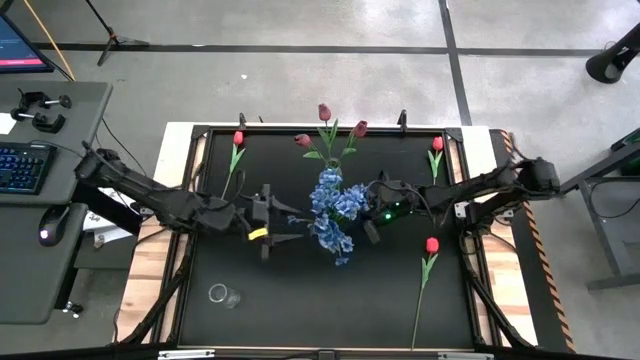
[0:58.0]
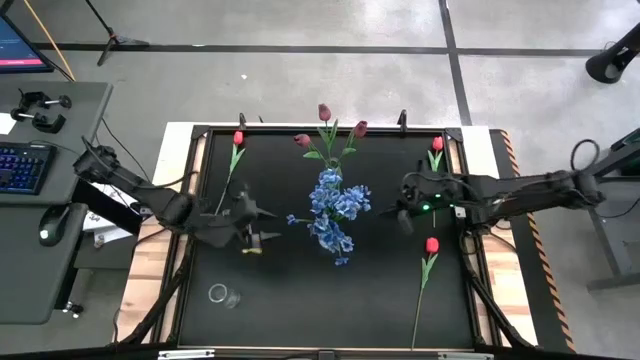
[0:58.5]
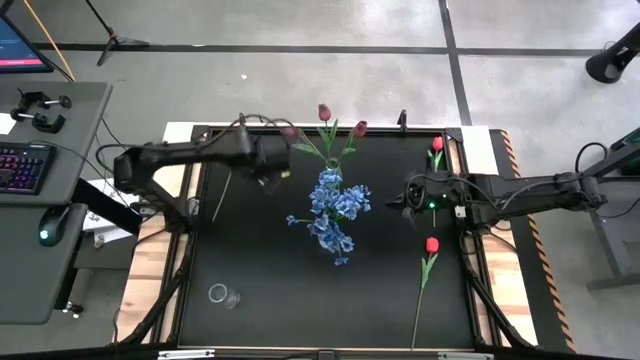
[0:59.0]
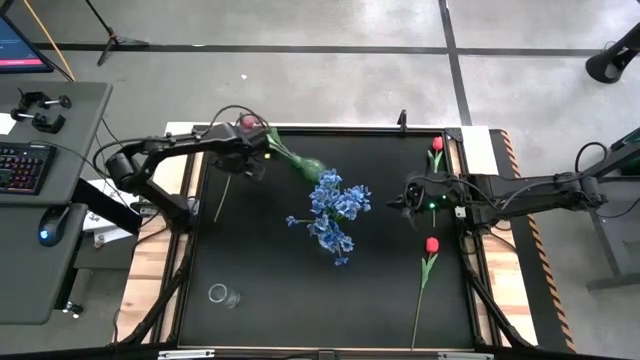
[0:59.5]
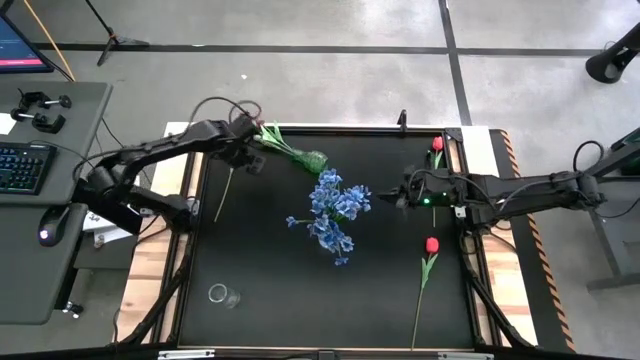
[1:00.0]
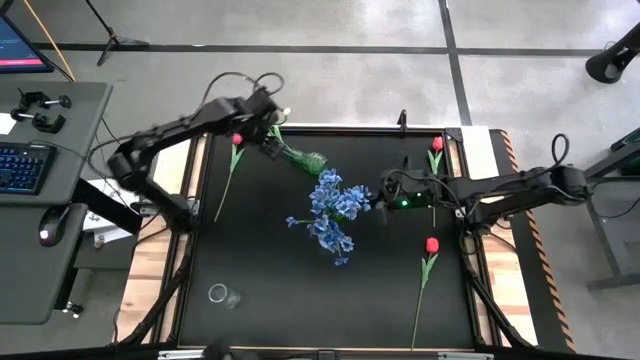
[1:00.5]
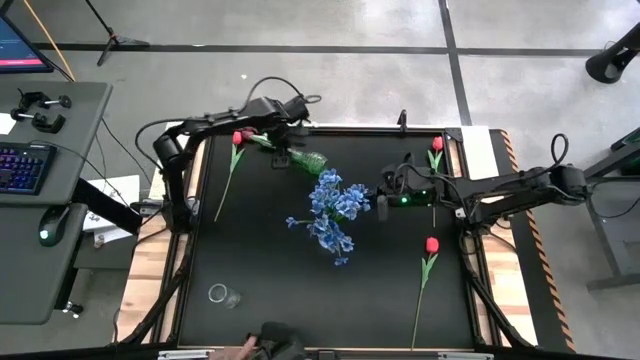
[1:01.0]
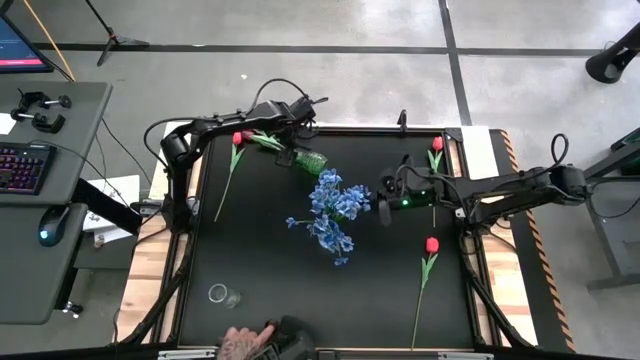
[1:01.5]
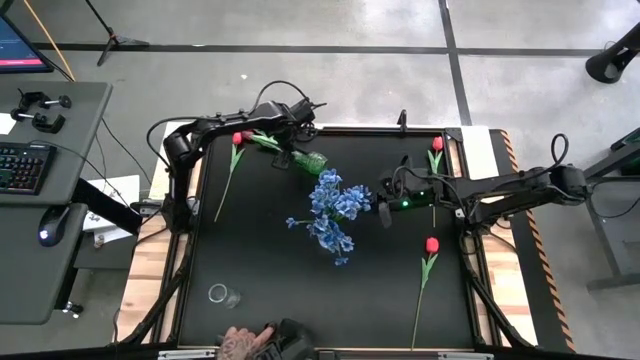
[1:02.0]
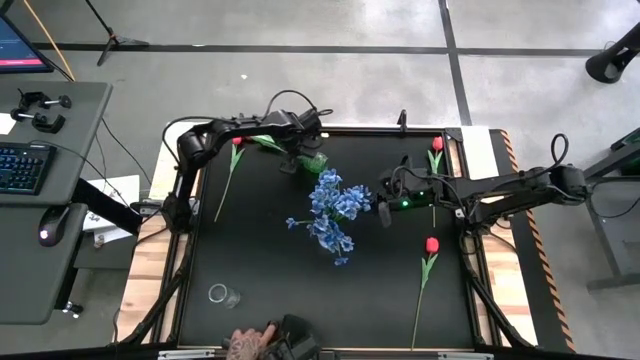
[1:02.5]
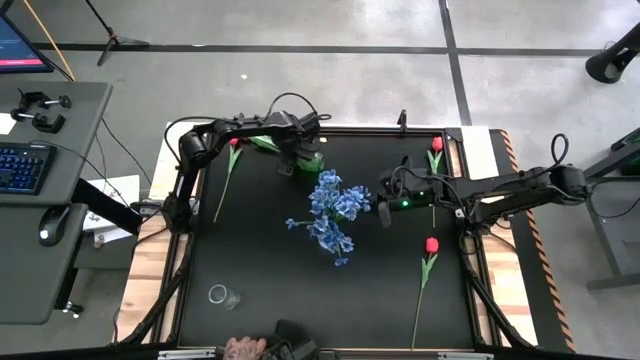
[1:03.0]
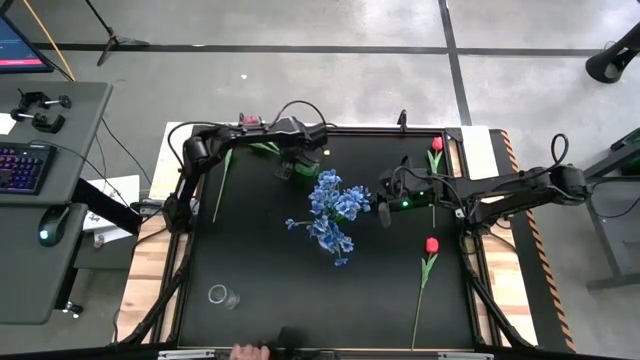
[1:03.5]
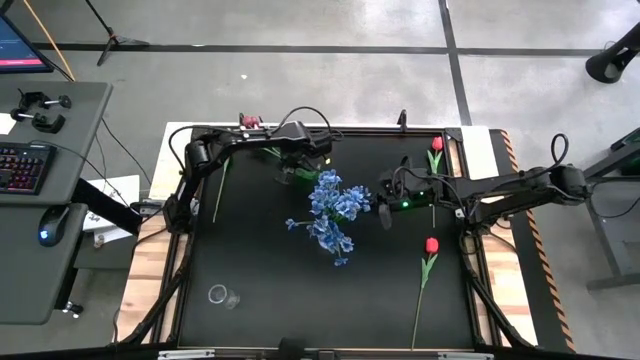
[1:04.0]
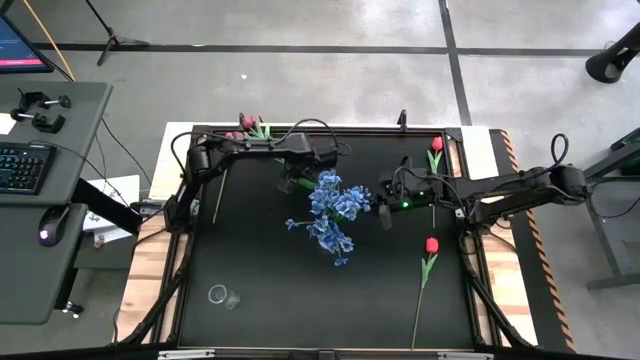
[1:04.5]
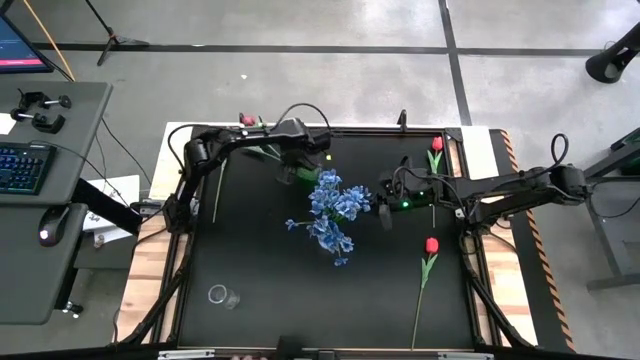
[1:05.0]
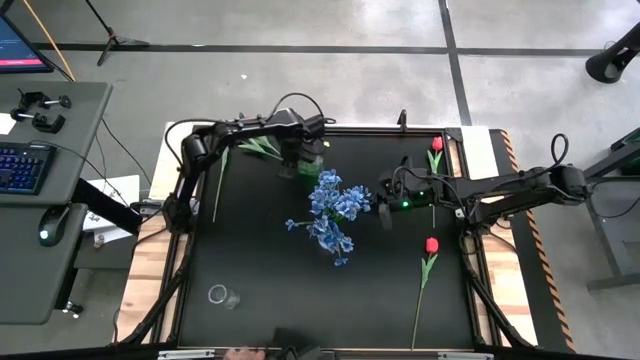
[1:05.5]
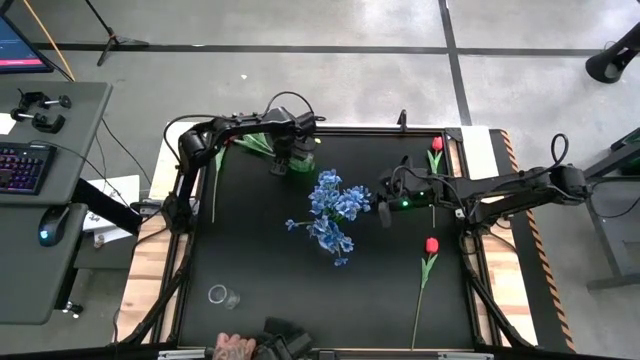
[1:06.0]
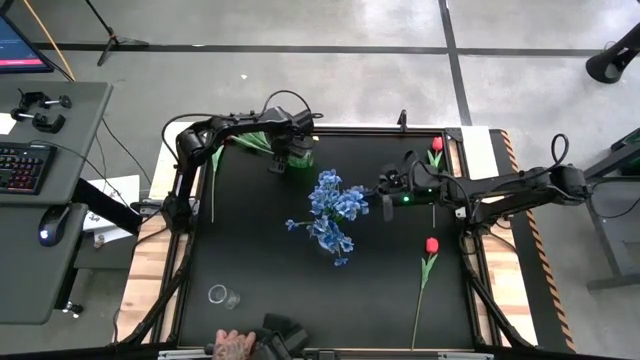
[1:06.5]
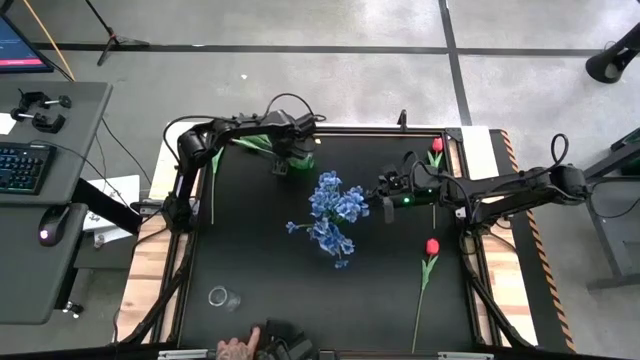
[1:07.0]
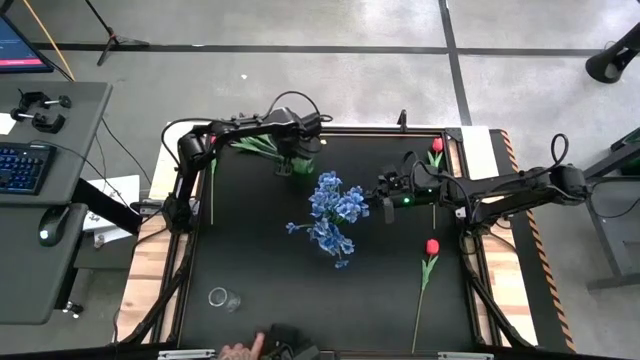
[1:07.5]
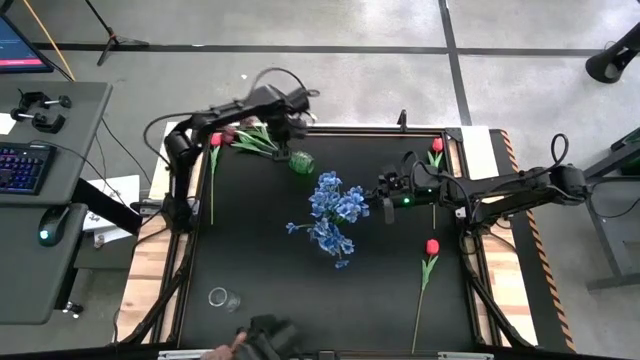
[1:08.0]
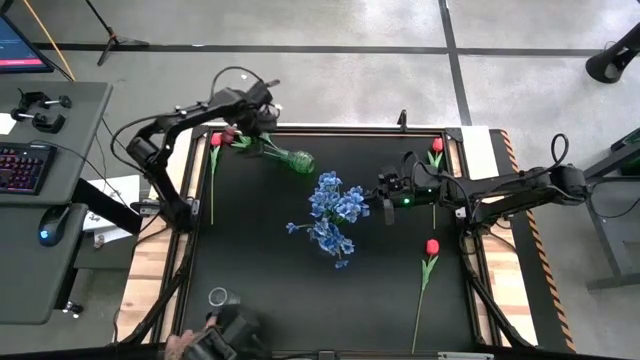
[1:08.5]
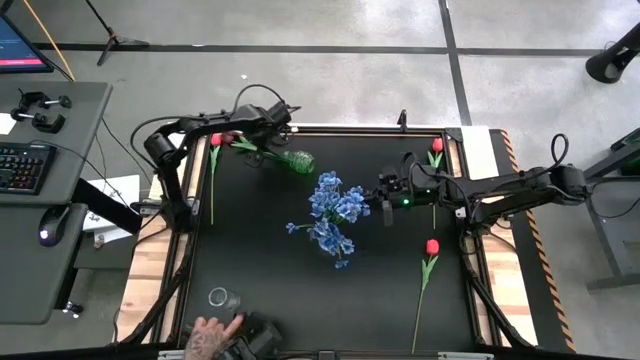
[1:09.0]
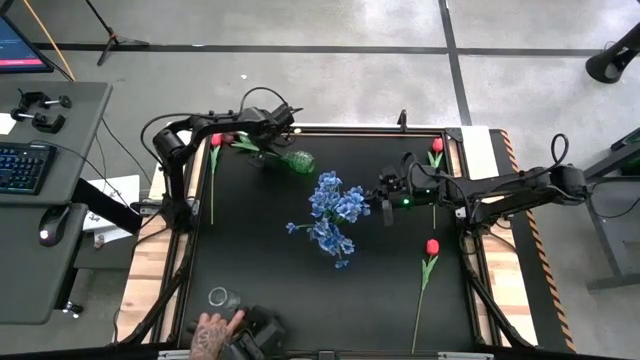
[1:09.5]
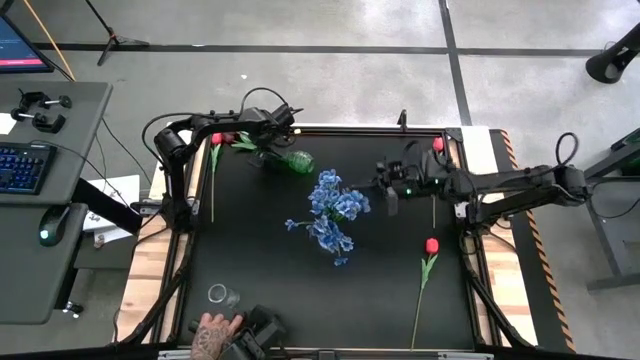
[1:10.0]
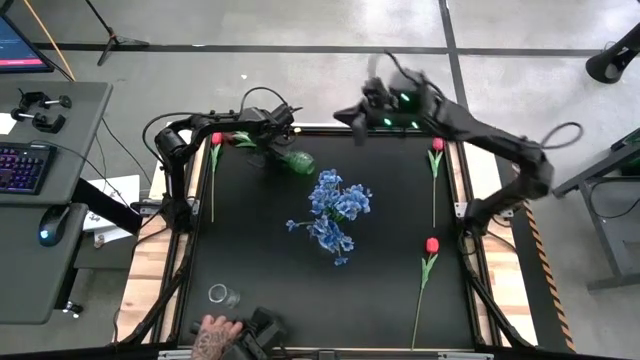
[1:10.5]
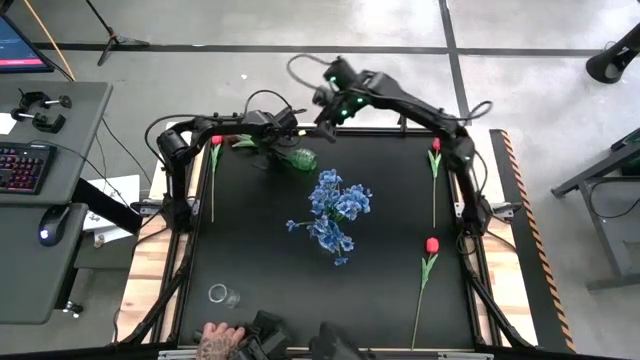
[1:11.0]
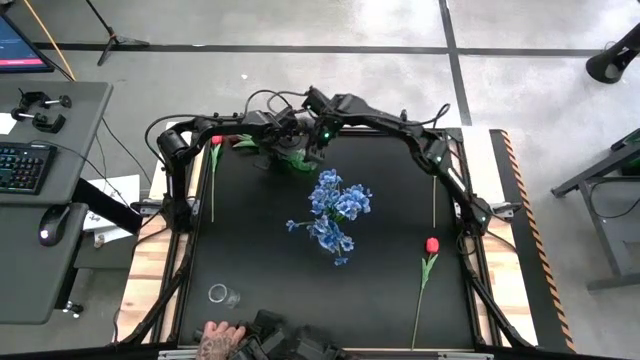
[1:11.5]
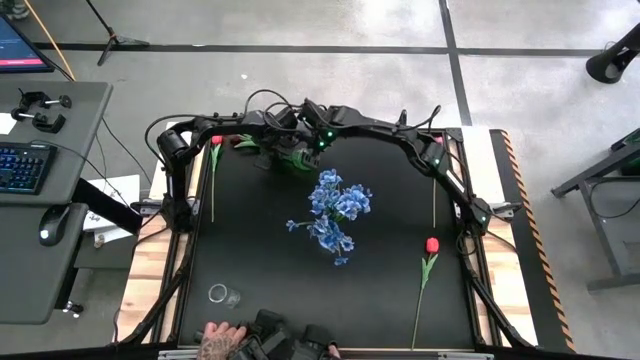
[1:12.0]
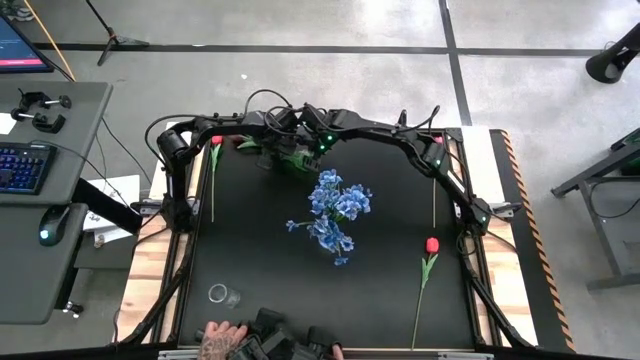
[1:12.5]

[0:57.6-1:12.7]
Task: Sort flowers into vase by color
Adjust the green vase on the table

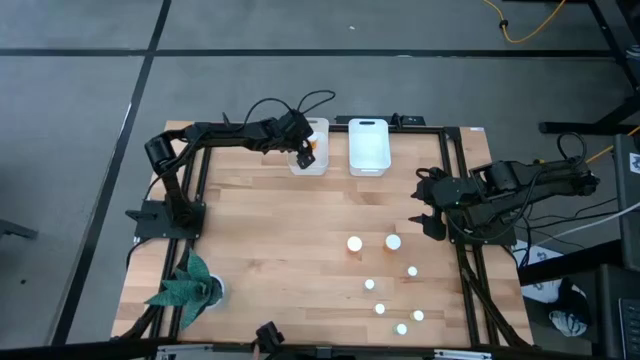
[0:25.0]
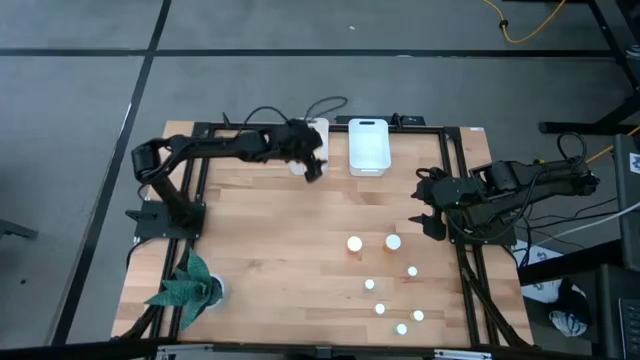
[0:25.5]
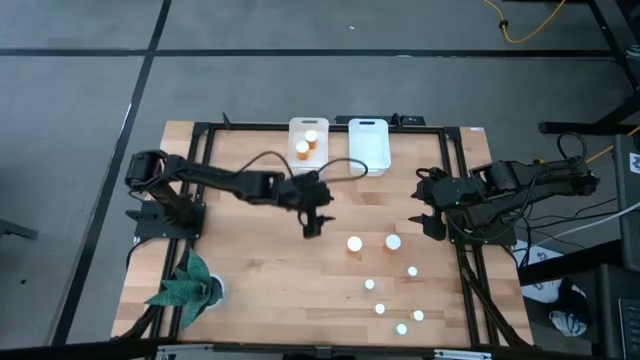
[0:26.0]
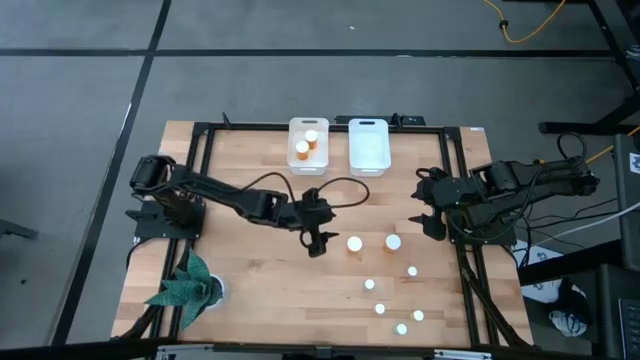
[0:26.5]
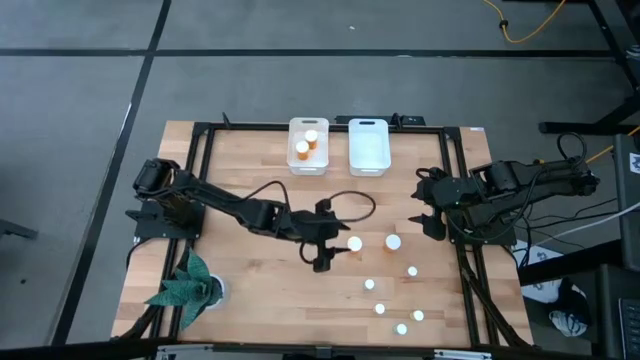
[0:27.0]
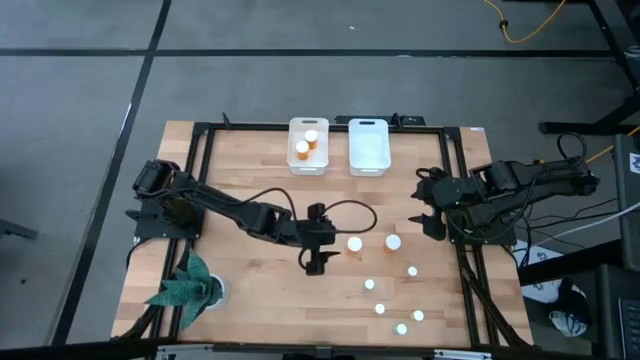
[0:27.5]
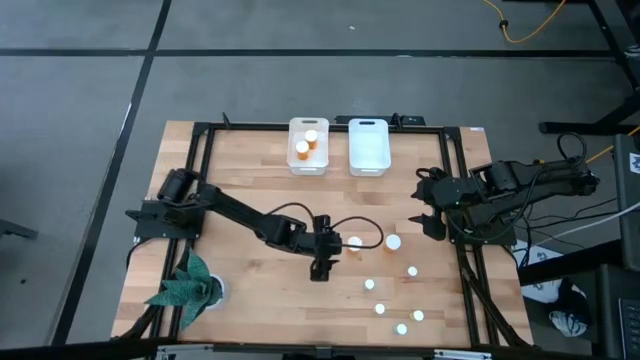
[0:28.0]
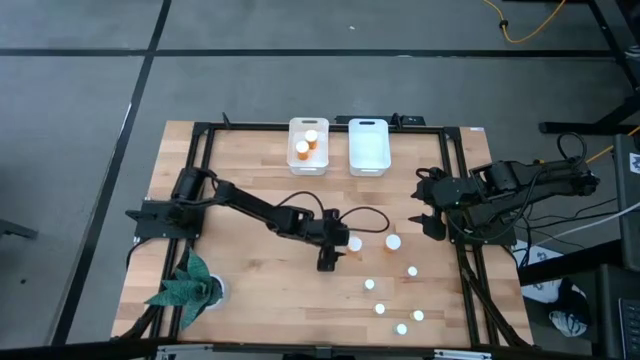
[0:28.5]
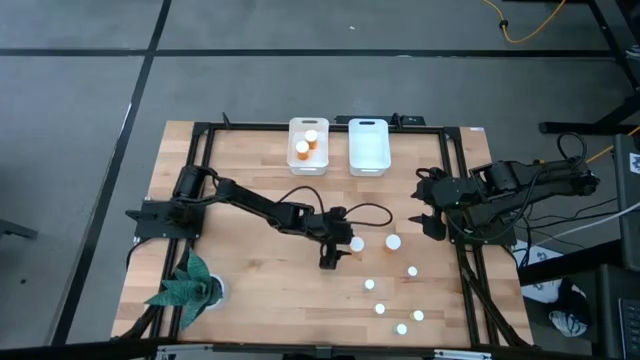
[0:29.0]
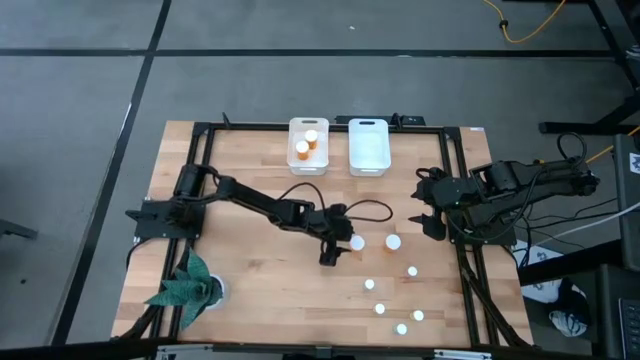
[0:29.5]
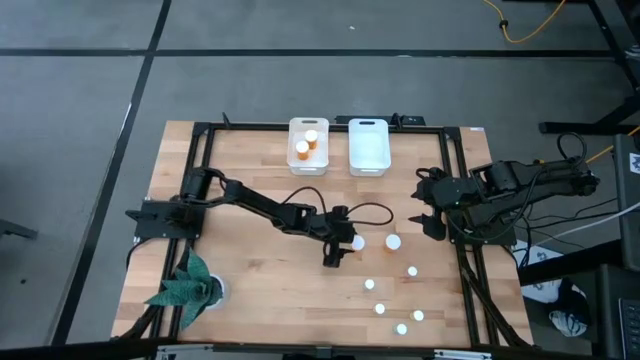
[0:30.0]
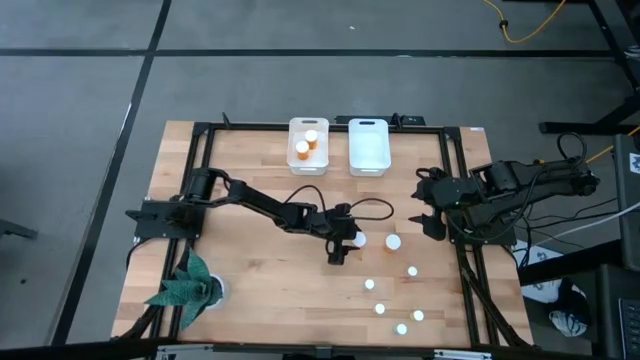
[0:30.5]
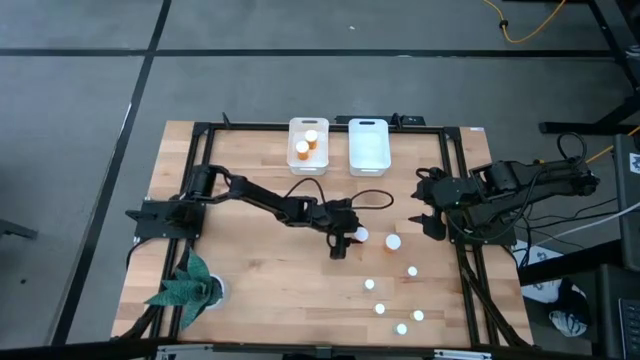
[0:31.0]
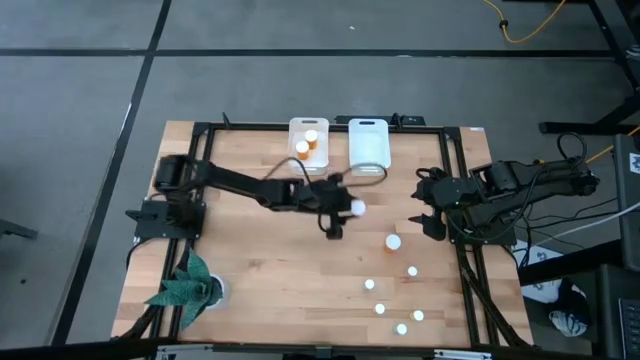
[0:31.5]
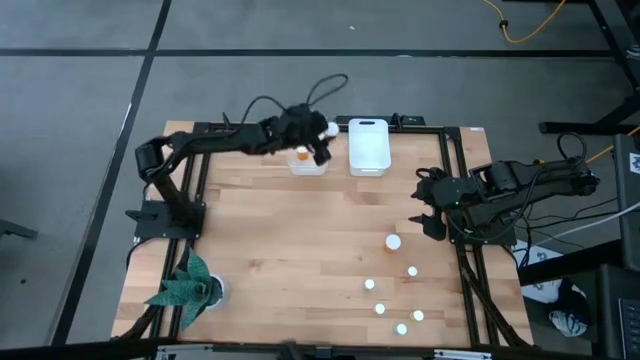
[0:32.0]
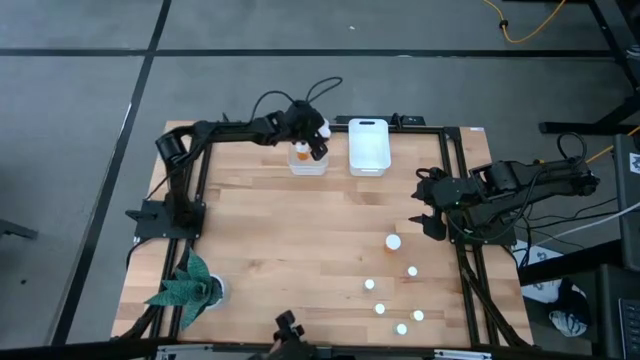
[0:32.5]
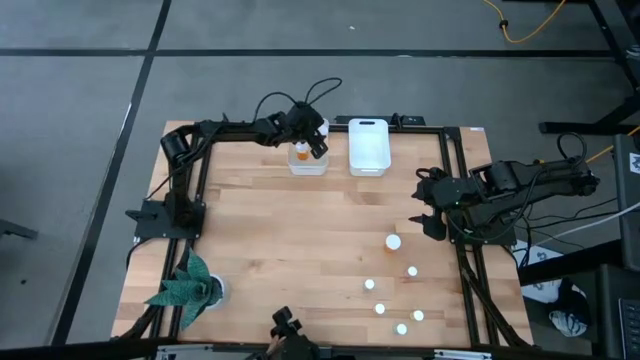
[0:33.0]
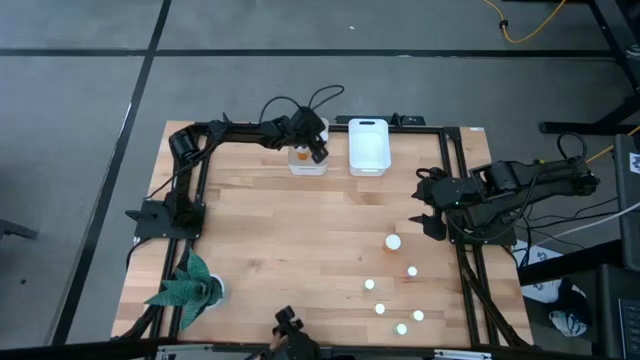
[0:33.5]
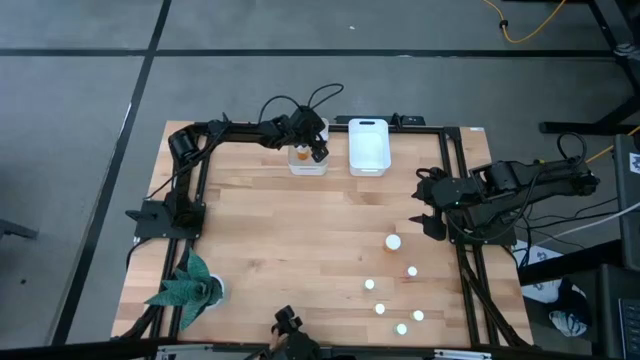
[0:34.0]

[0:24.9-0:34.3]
Task: Pick and place medicine bottles into bin by pill shape (circle, oval)
Put the orange capsule bottle into the left white bin
